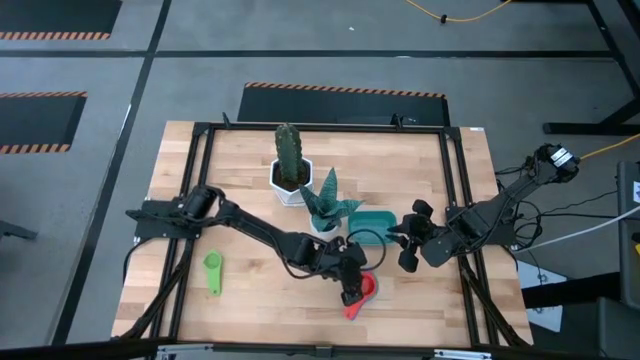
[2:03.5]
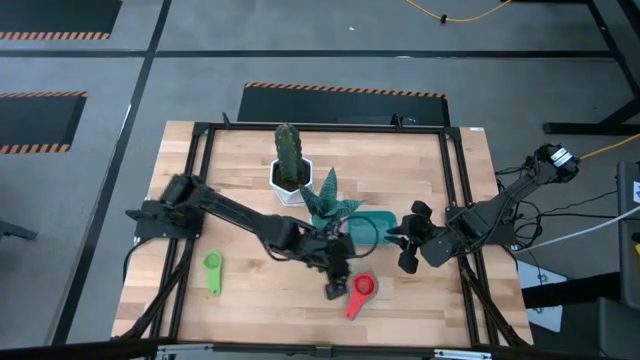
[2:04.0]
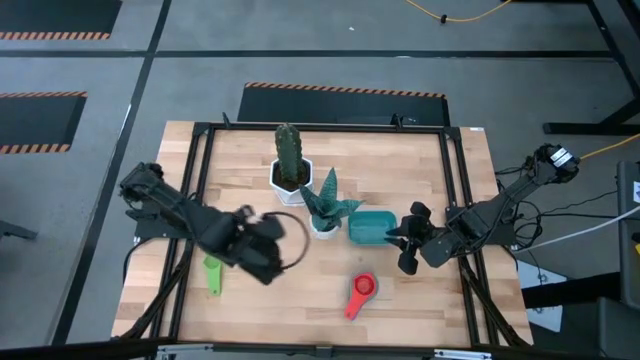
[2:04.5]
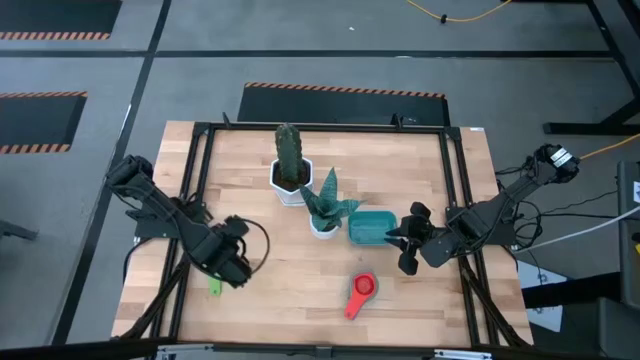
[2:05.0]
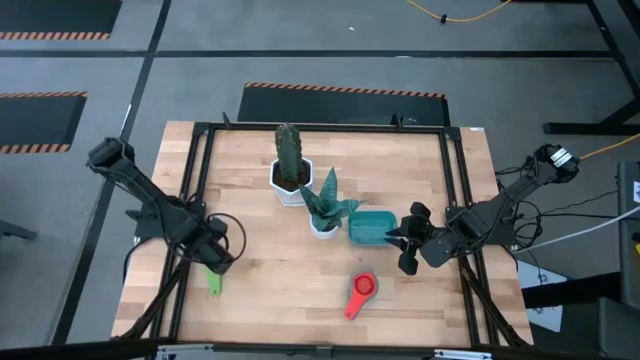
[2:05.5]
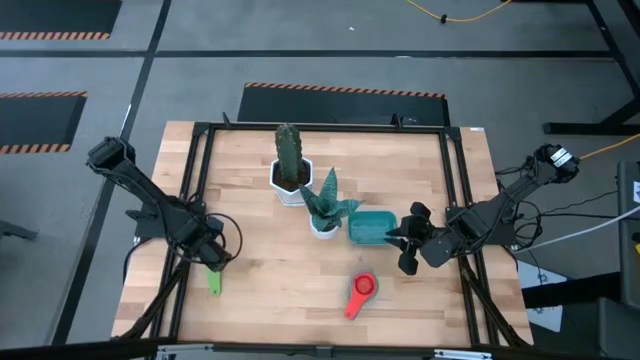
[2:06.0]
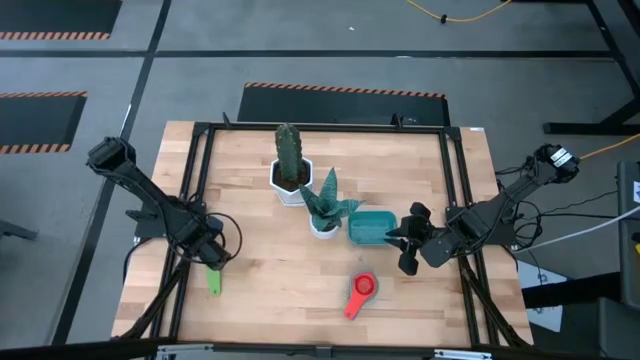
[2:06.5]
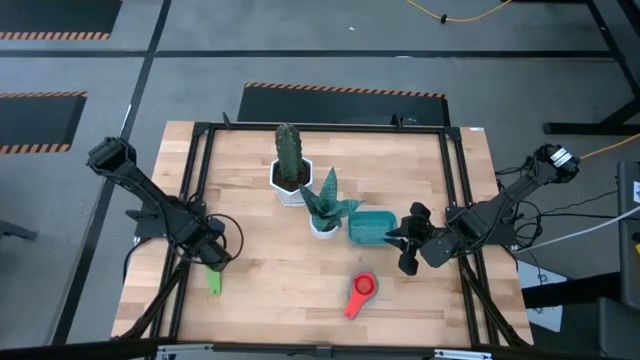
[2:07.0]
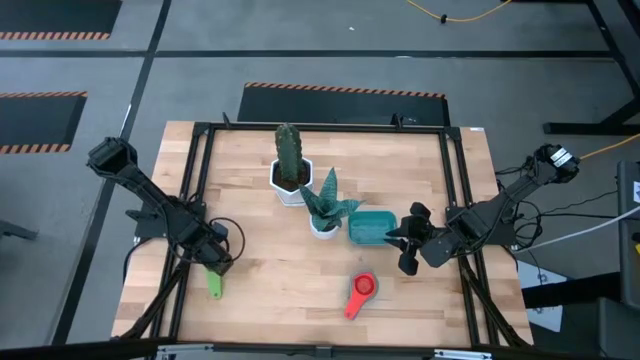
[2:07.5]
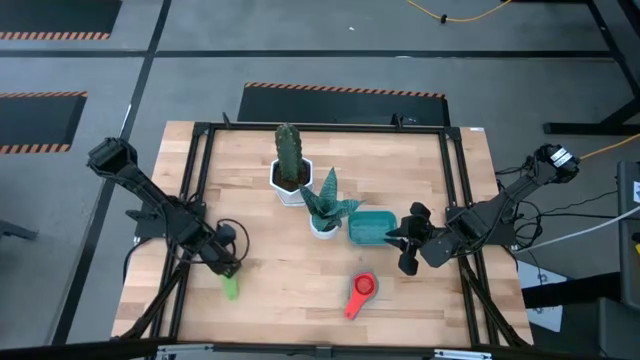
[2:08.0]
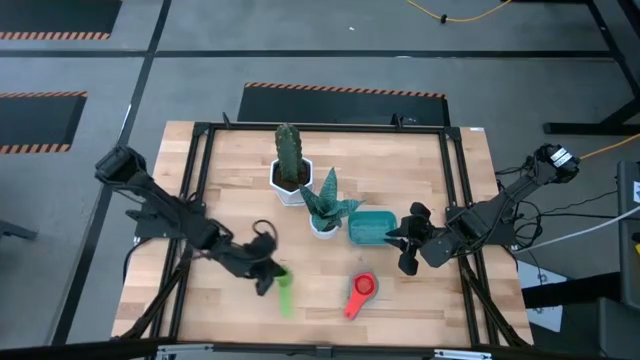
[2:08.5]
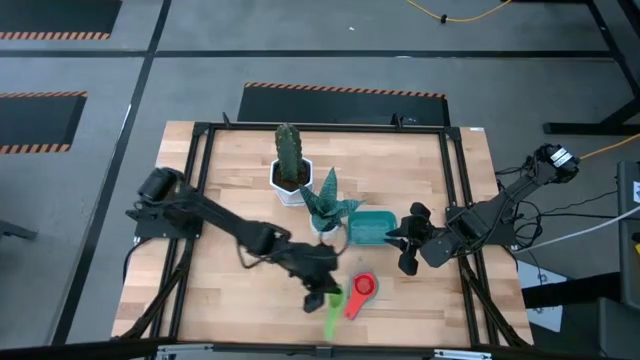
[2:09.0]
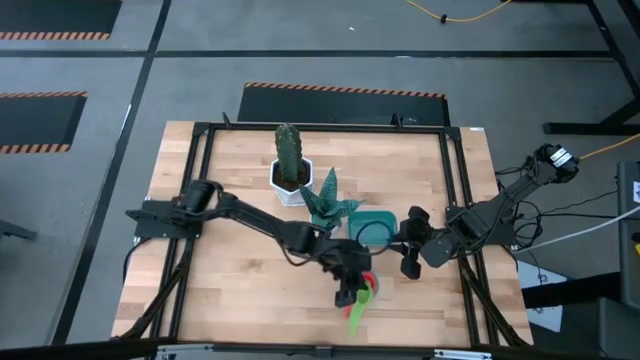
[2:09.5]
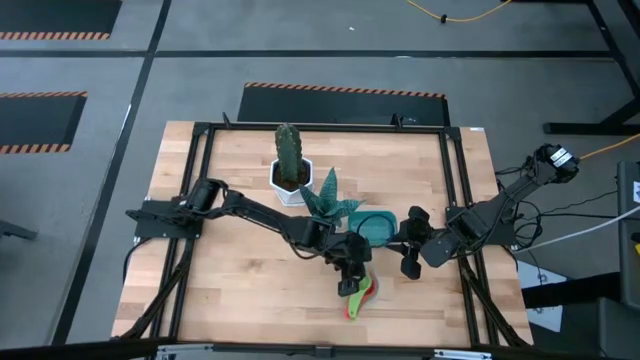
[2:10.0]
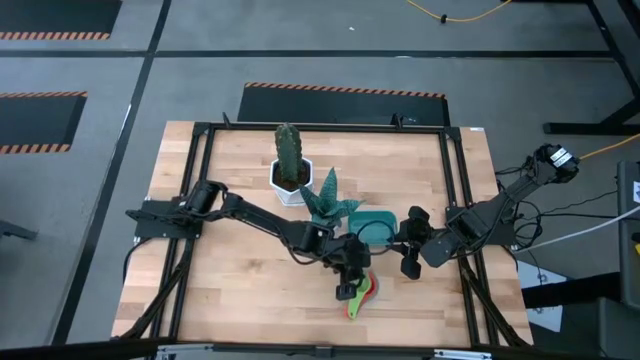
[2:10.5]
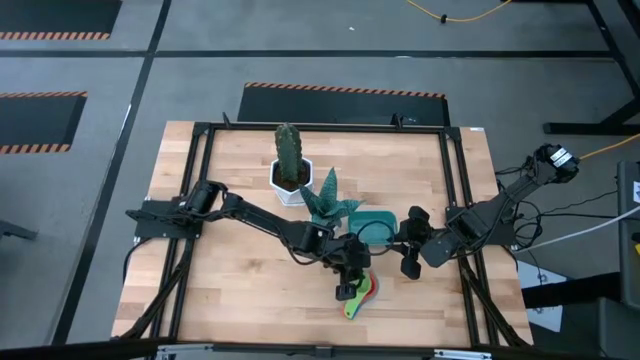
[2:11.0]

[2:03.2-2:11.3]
Task: Nest measuring cups in basket
Stack the green measuring cup on top of the red measuring cup

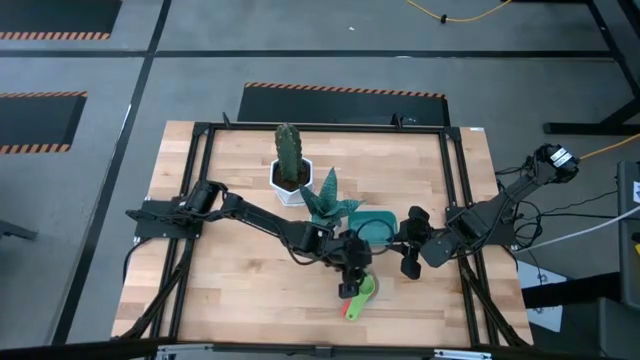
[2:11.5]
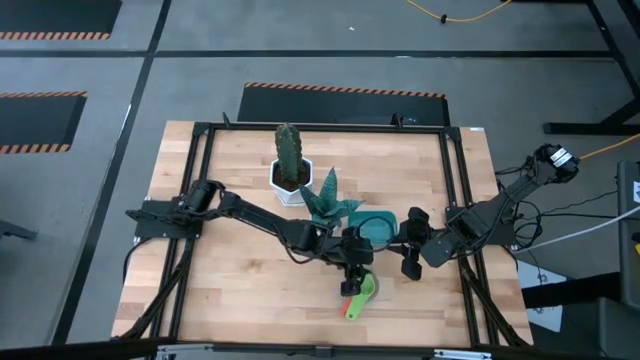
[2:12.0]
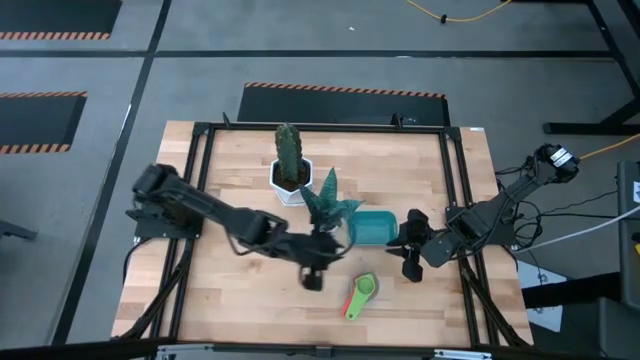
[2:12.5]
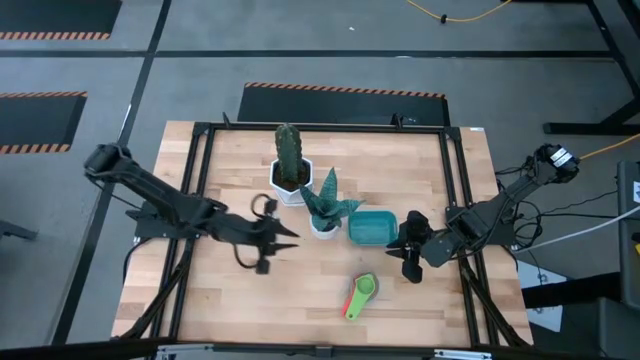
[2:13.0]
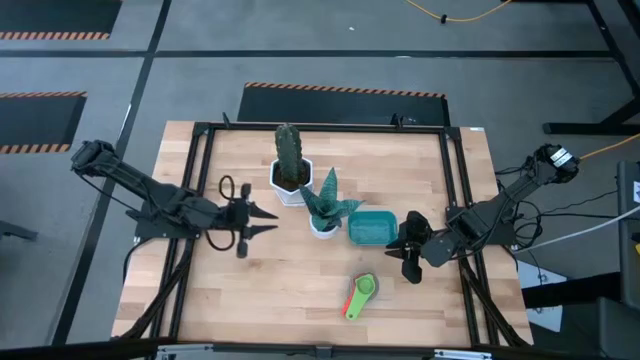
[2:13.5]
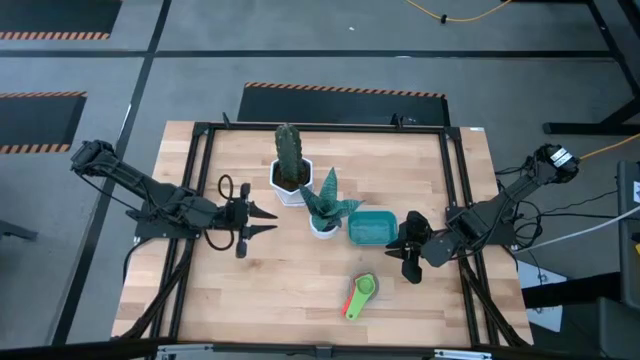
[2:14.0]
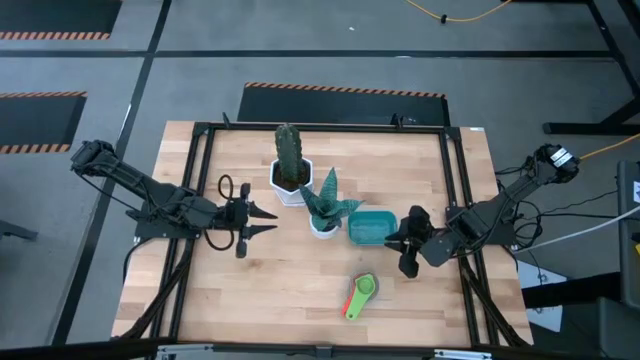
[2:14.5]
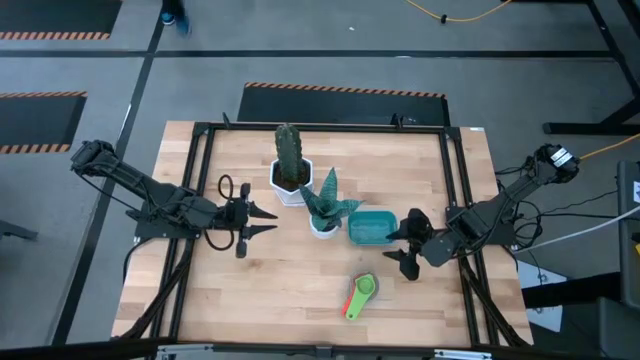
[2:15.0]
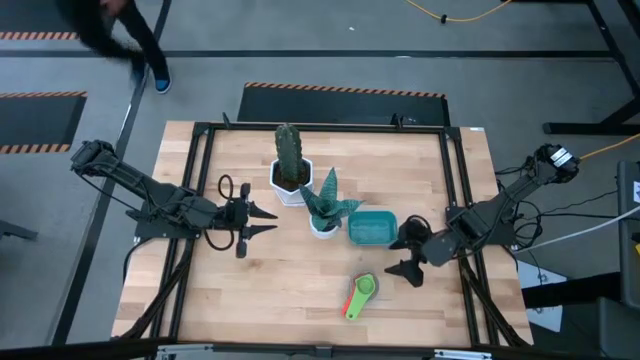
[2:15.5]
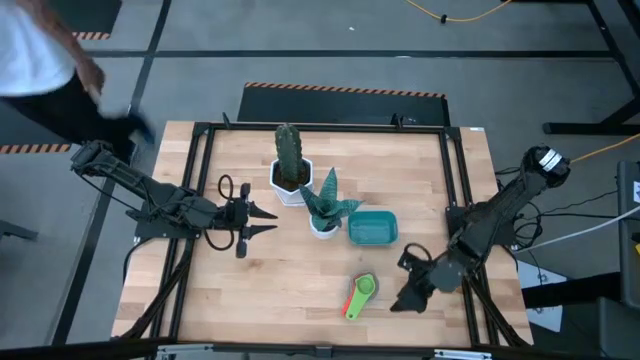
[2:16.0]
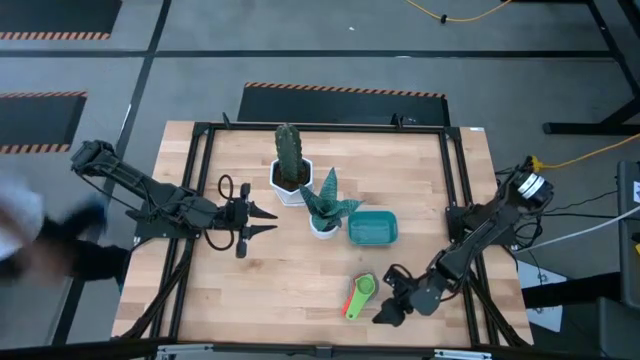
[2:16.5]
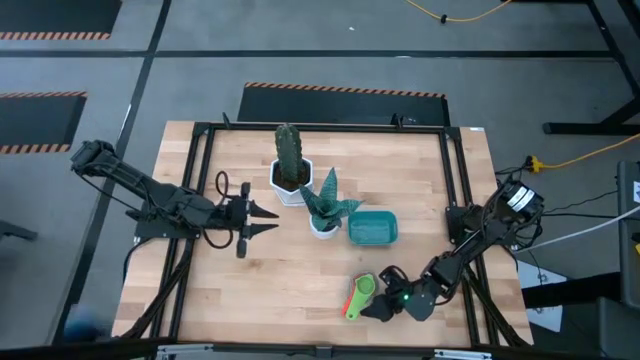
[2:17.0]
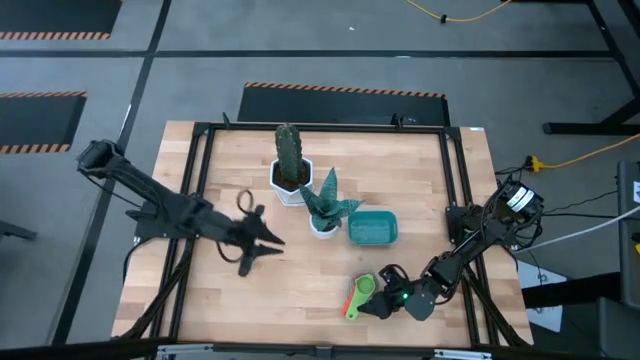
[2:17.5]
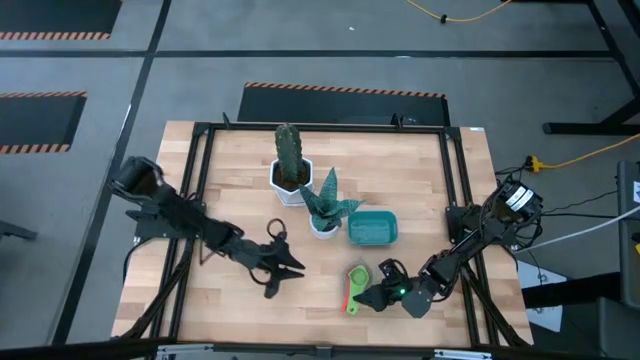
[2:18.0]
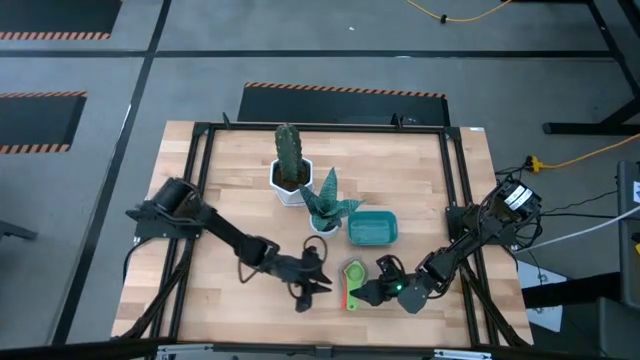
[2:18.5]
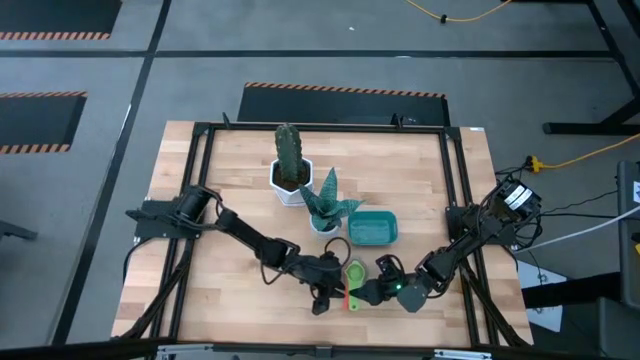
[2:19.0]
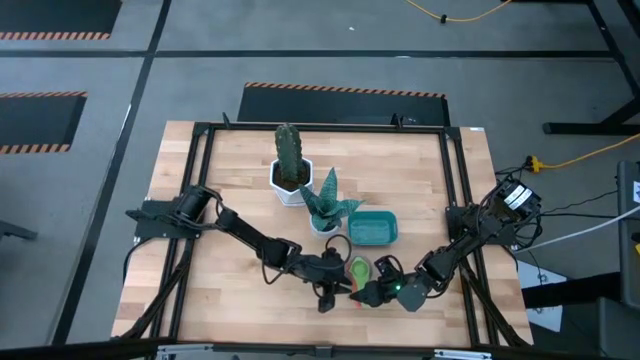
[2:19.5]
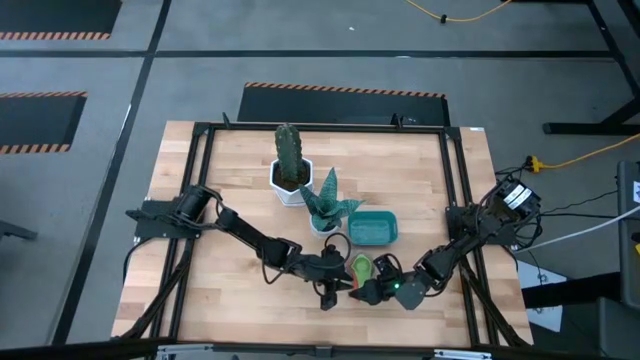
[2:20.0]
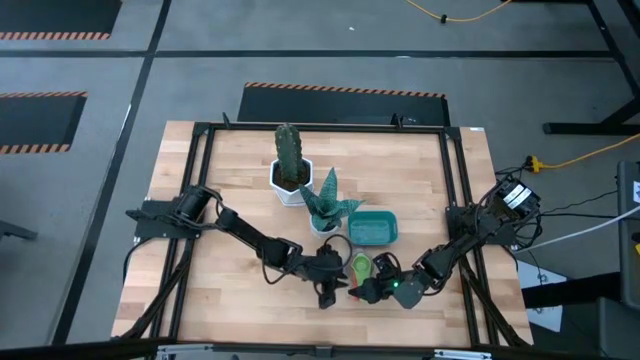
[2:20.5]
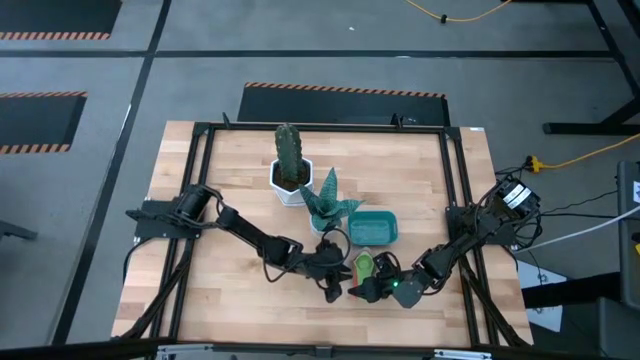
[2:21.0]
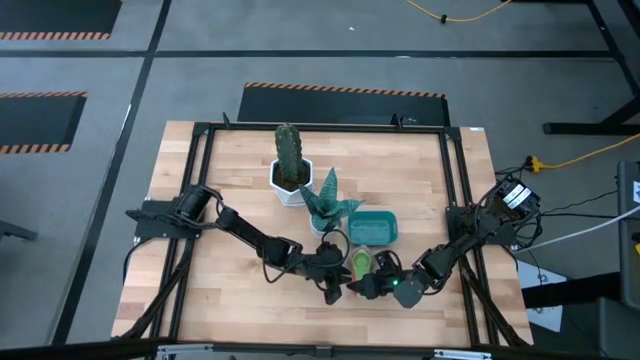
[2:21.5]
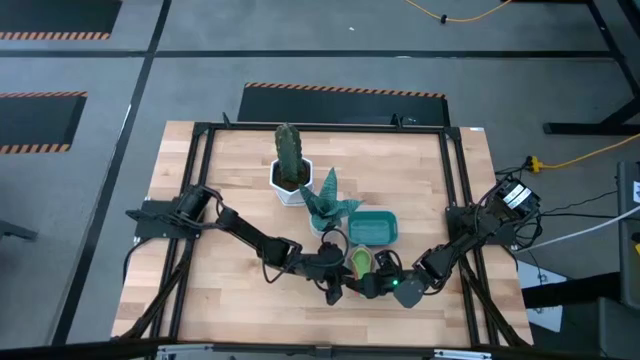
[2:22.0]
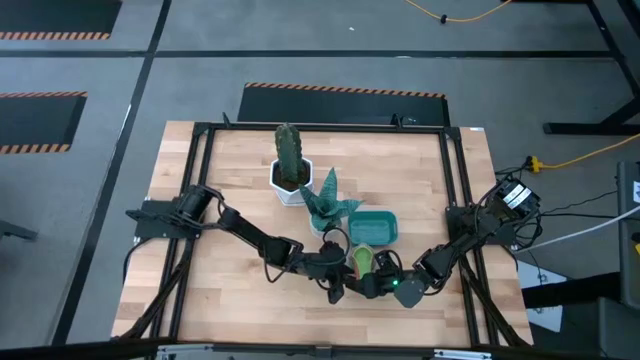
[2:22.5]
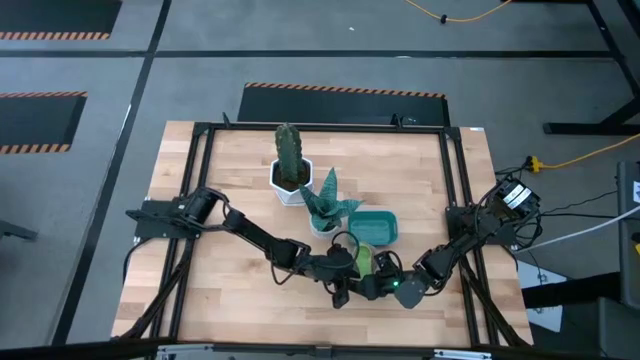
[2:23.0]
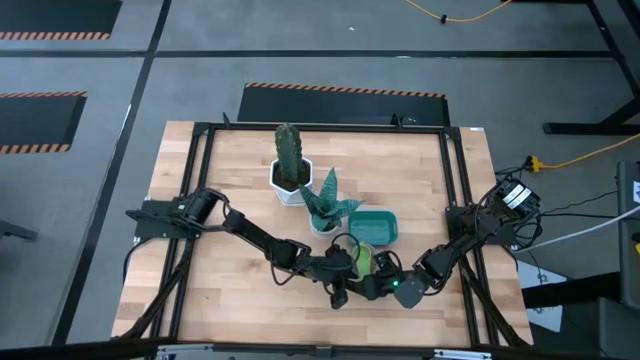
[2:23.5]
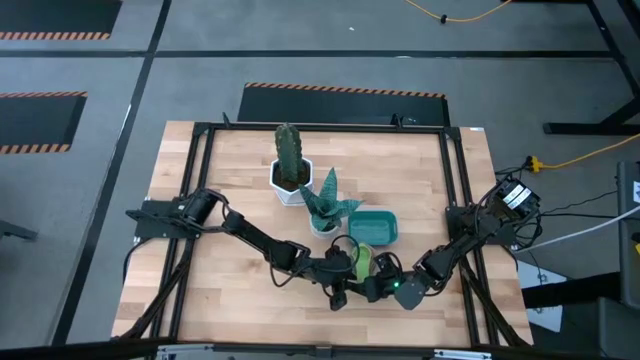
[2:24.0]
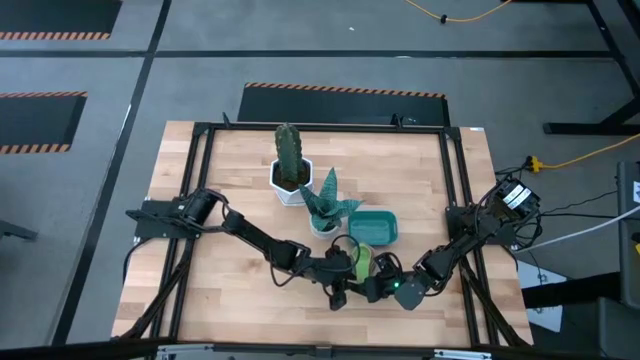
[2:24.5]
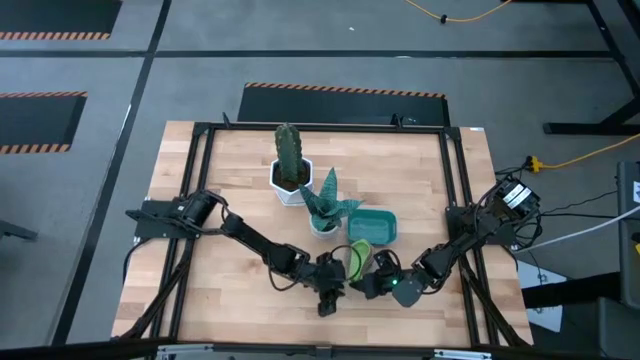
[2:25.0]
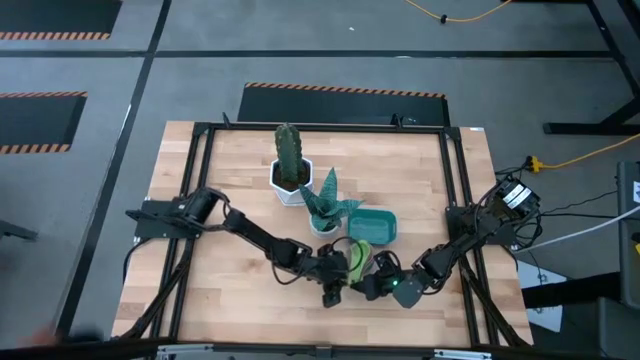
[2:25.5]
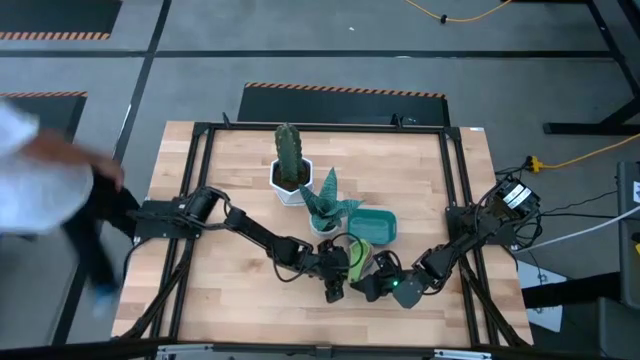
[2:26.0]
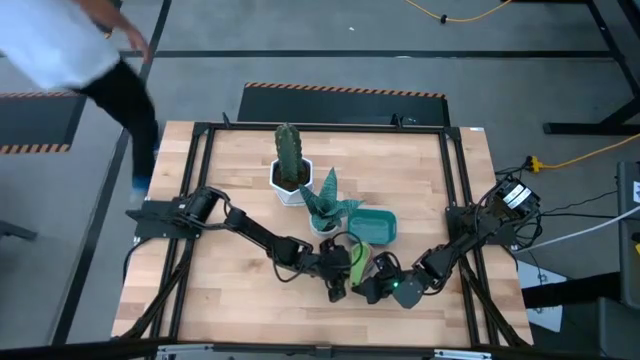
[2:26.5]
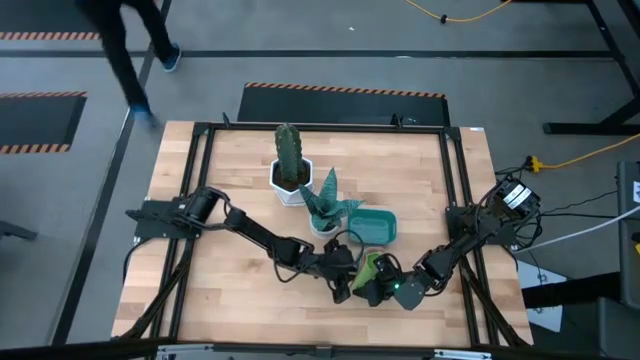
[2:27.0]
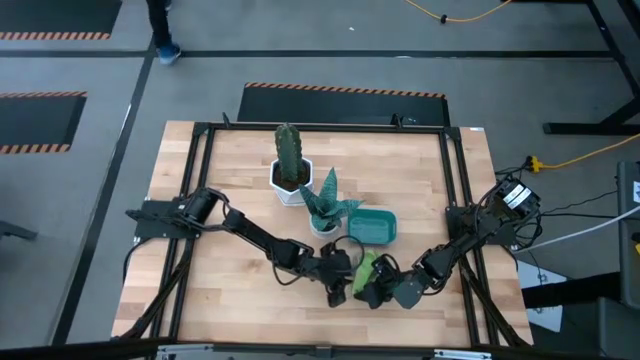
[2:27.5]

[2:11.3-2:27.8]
Put the nested measuring cups into the green bin
